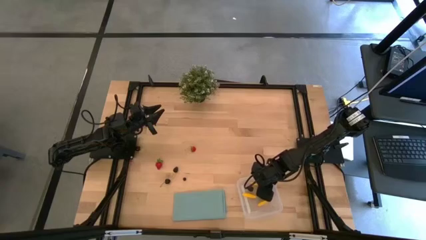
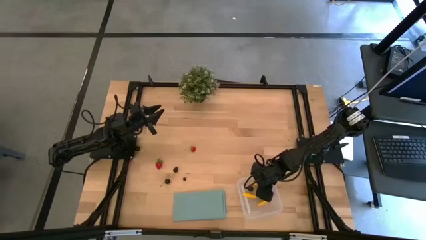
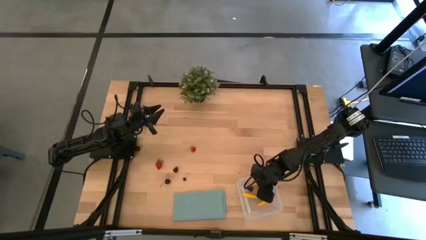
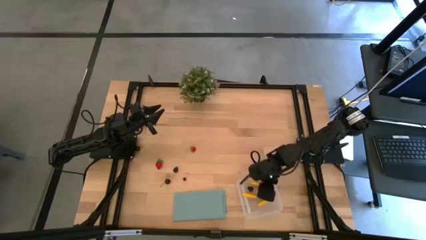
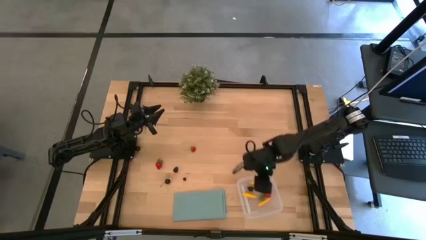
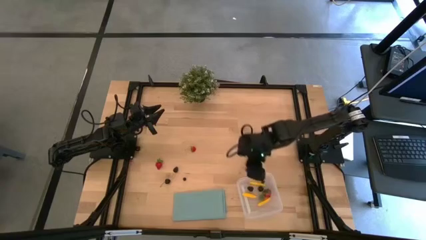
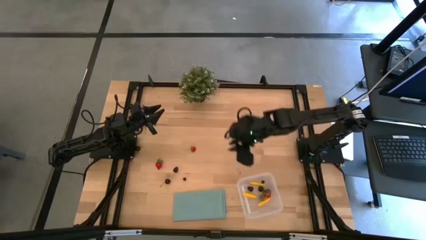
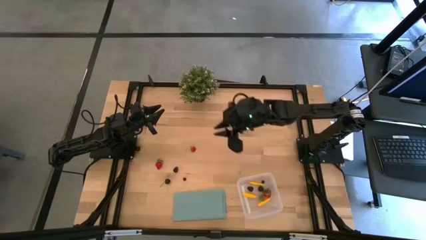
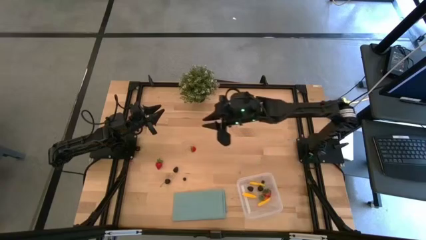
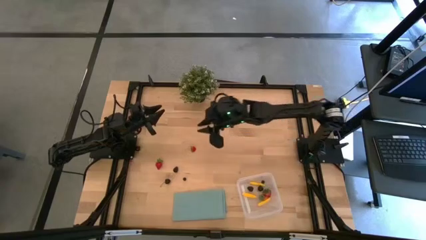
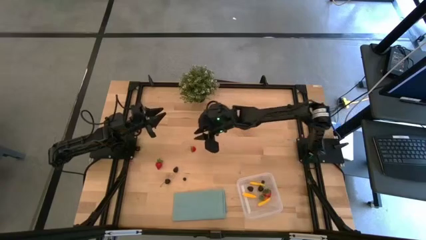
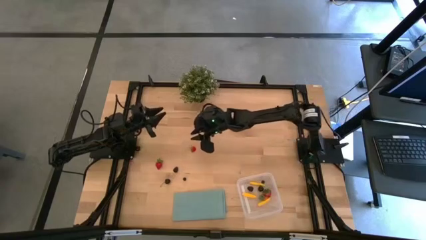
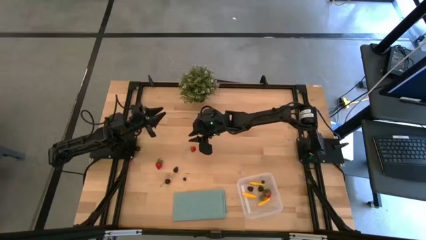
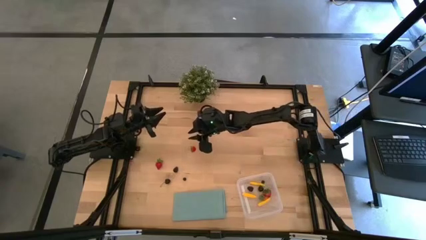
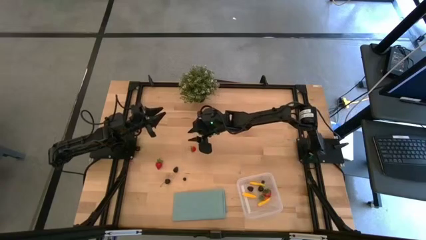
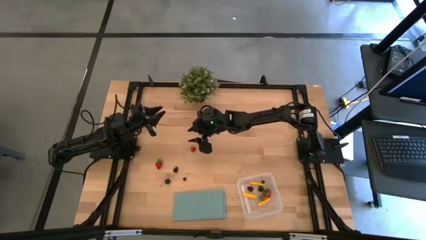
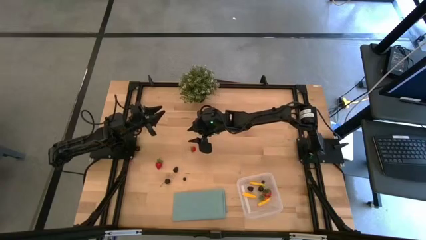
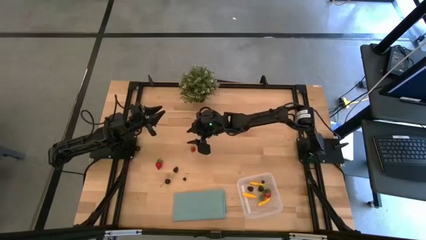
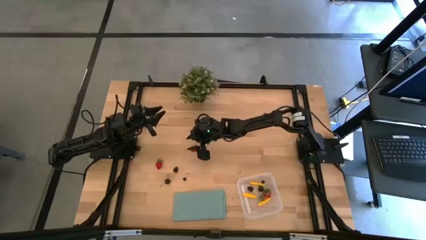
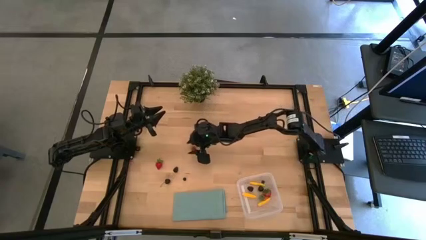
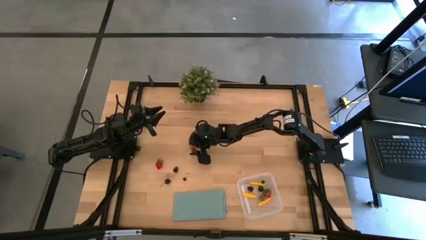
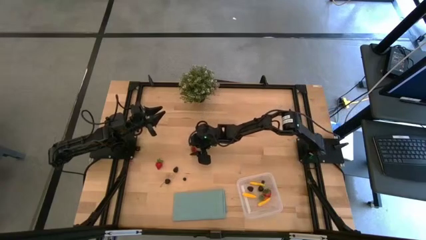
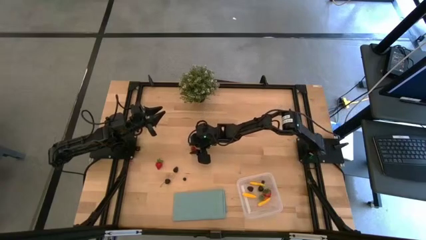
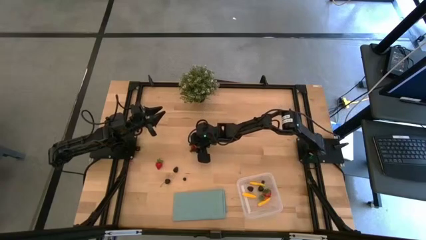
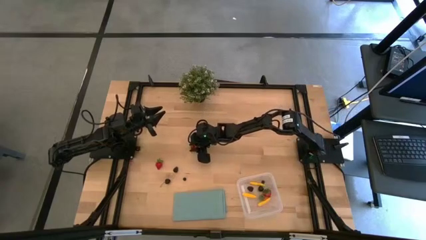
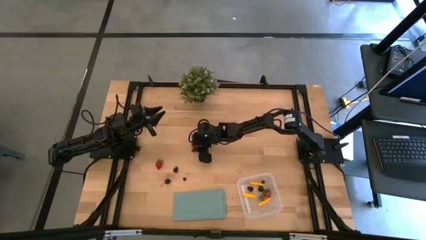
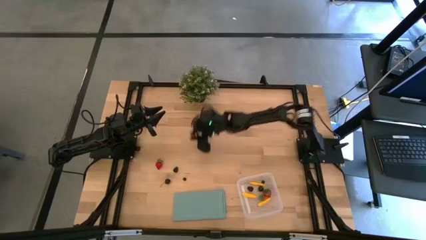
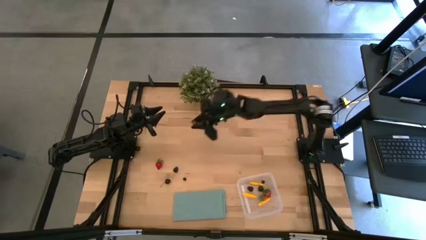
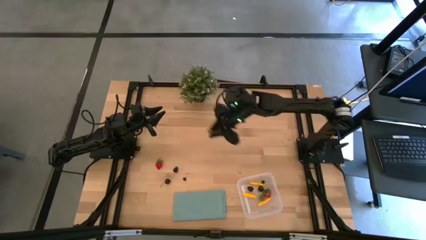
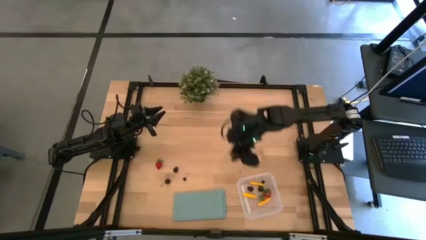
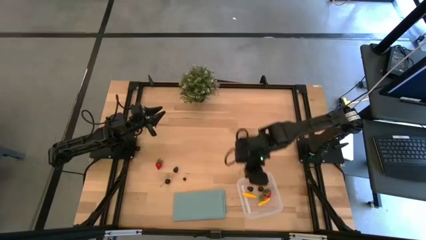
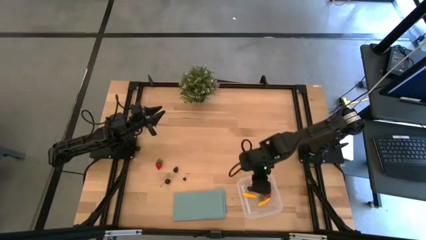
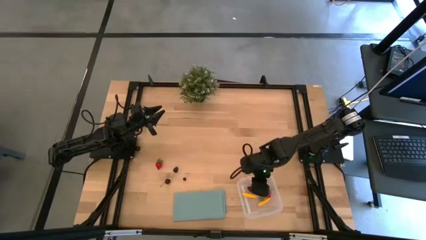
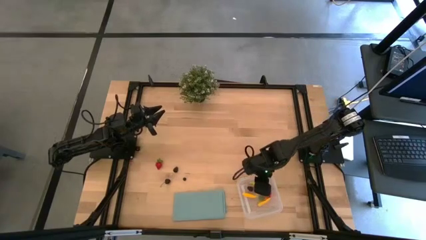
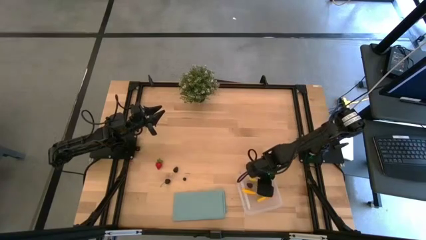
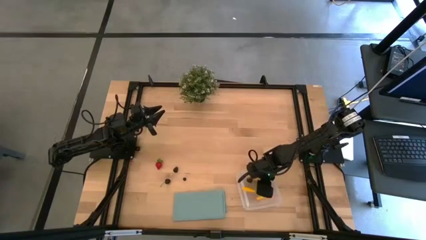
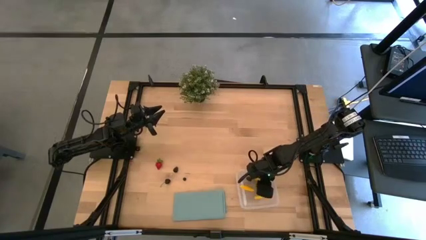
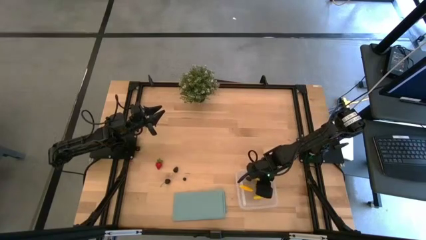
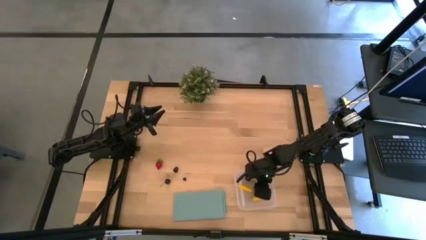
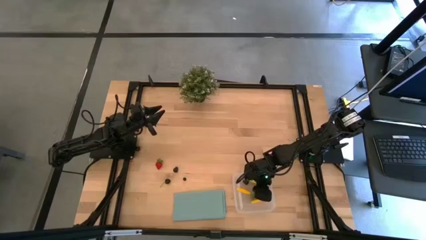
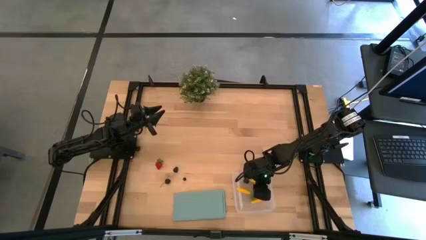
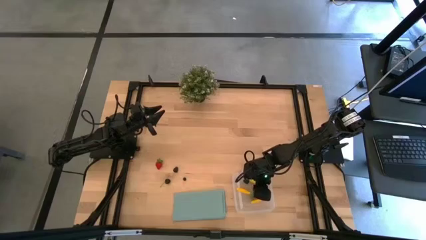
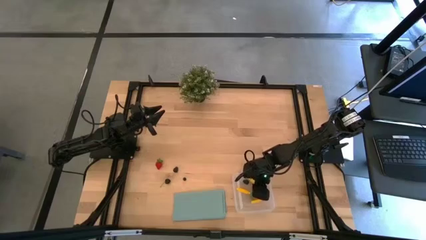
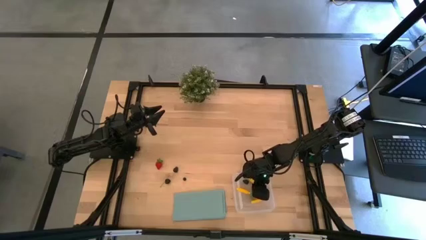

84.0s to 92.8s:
Task: Pick and placing Produce into tupperware
Put the red strawberry into the transparent bin

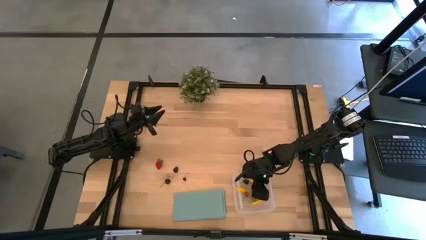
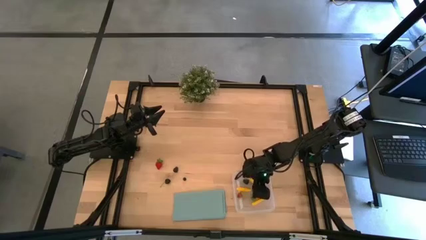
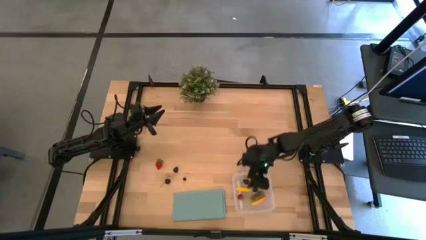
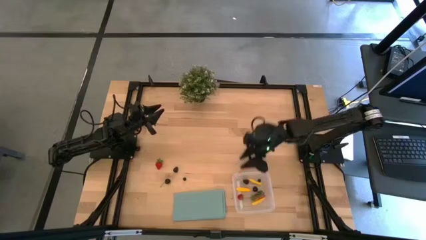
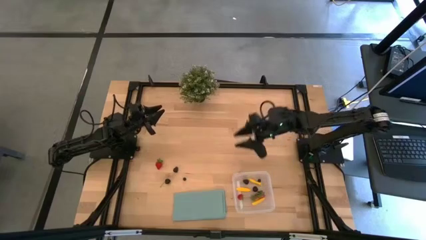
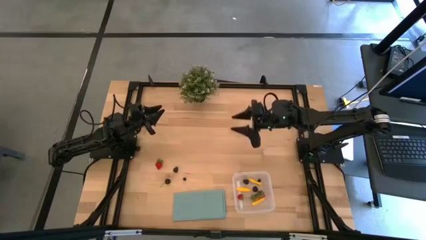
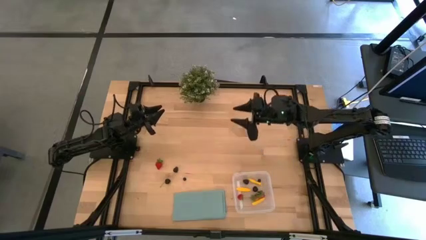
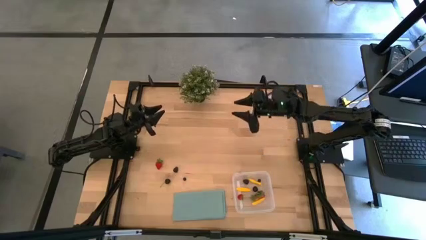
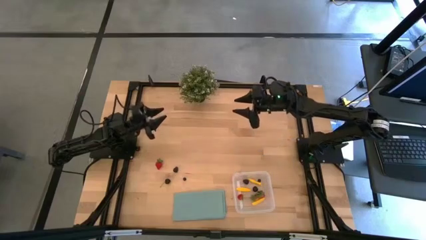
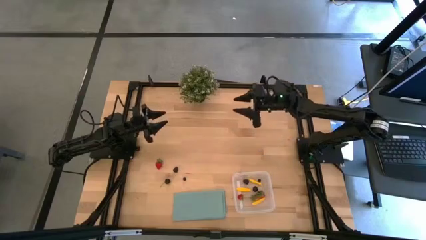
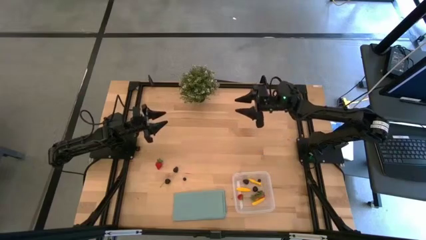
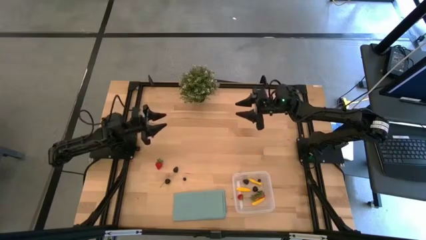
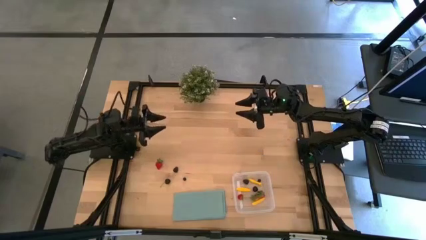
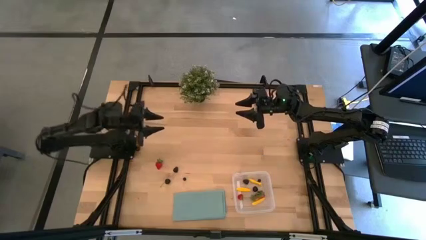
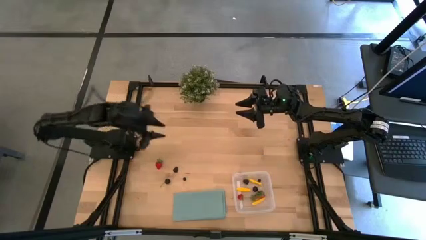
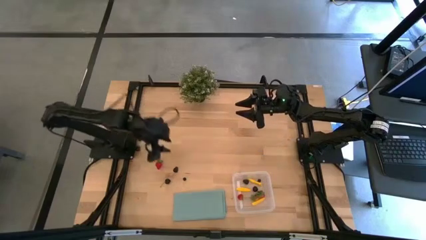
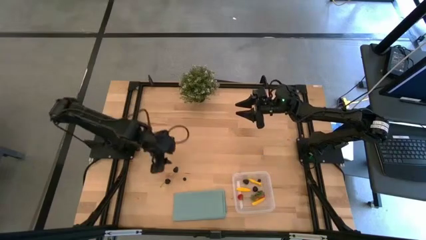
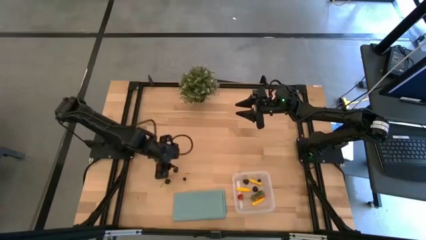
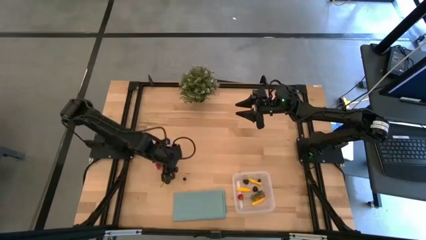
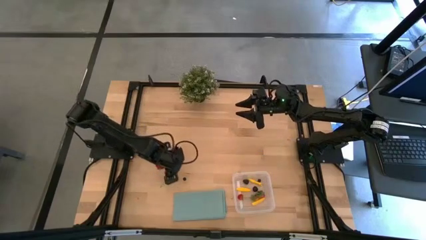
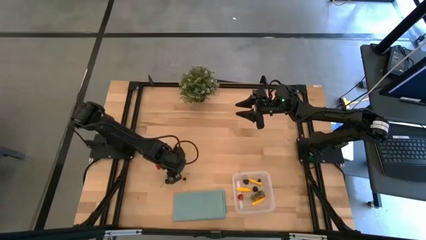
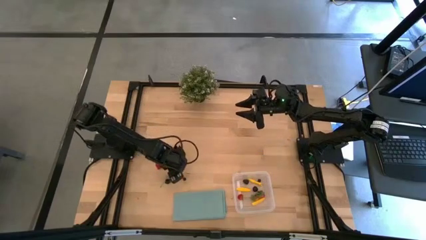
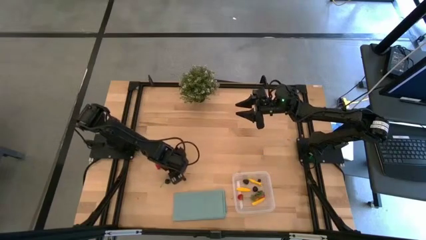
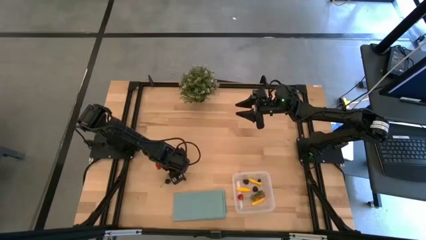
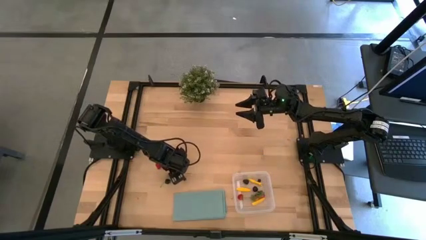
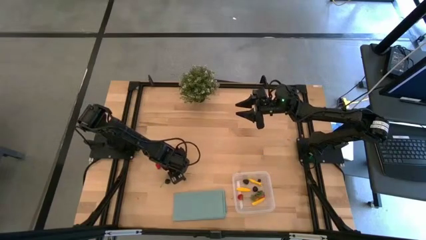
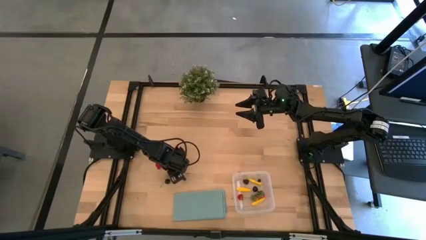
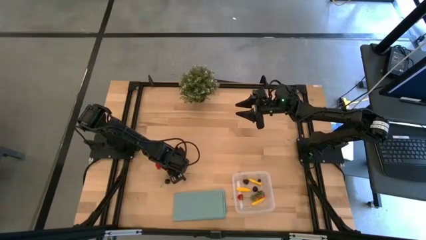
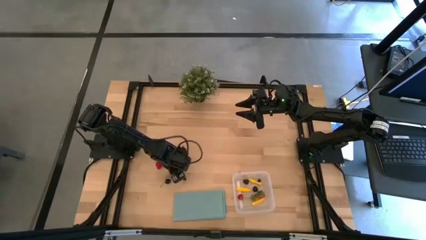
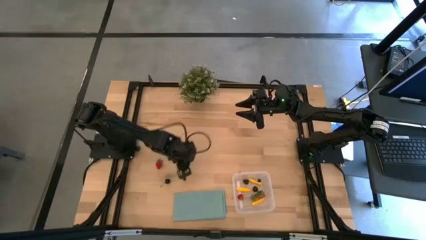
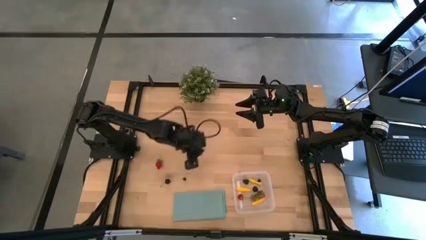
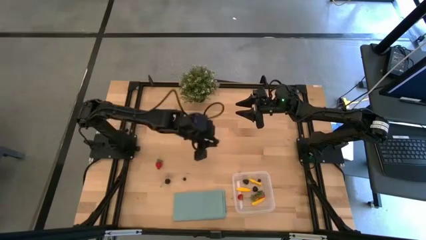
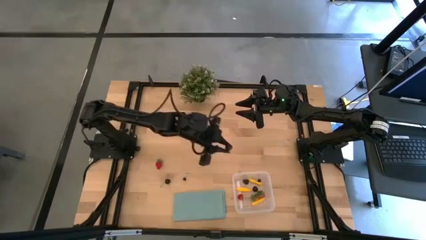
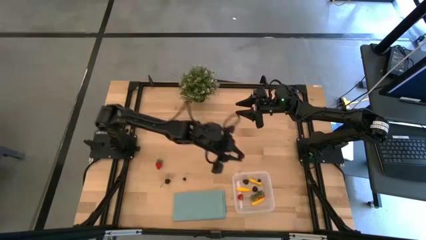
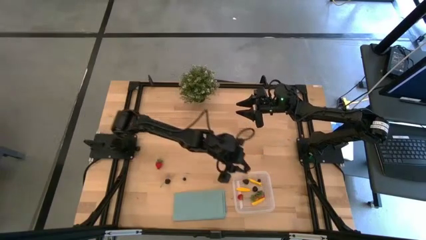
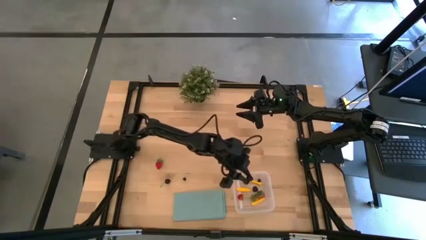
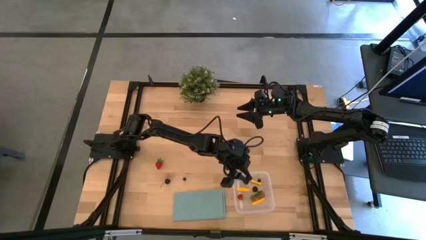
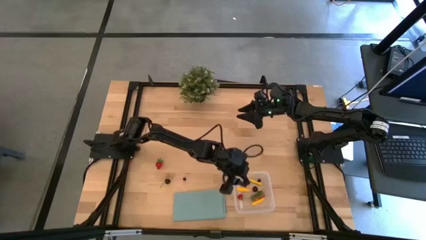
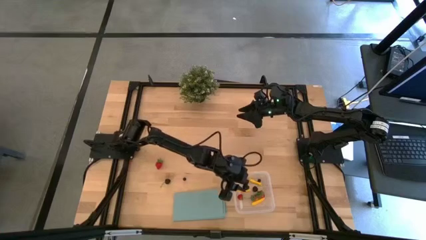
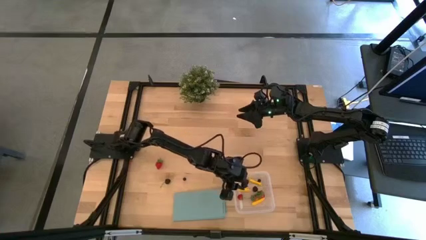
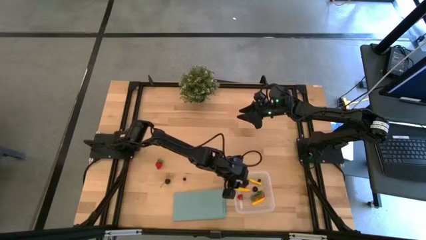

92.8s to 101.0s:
Put the blackberry into the transparent bin
